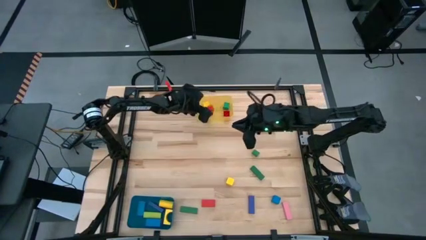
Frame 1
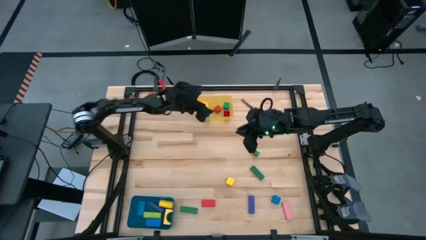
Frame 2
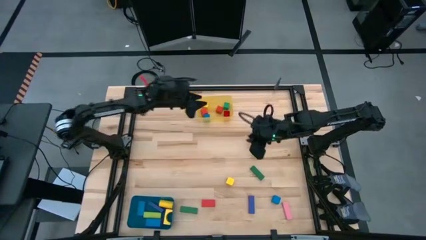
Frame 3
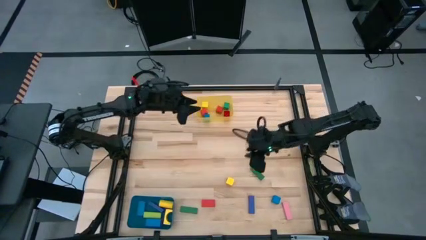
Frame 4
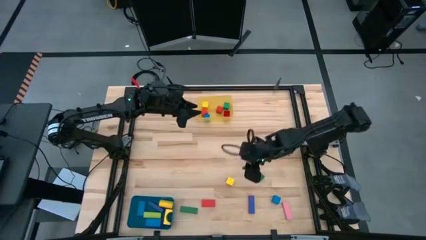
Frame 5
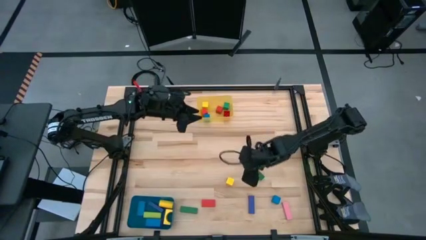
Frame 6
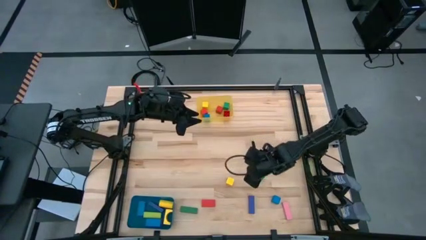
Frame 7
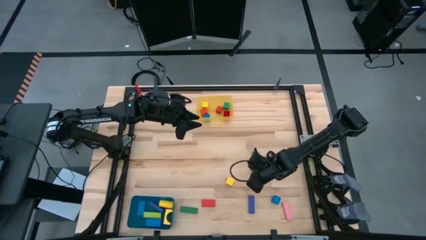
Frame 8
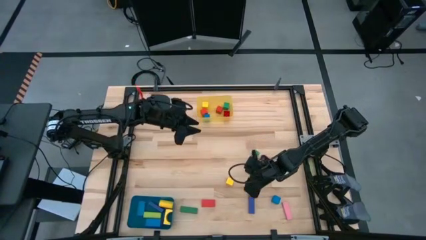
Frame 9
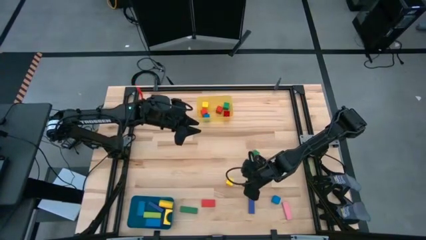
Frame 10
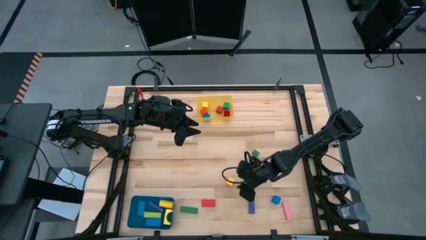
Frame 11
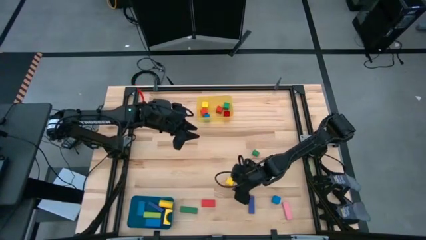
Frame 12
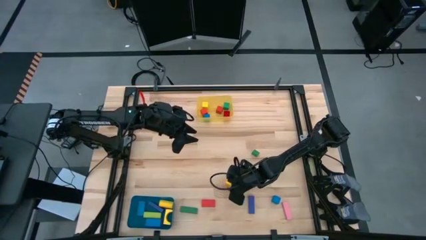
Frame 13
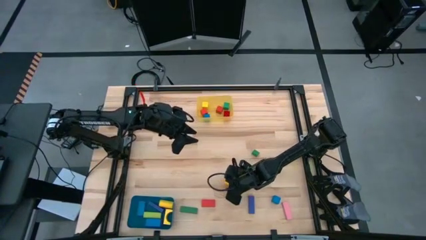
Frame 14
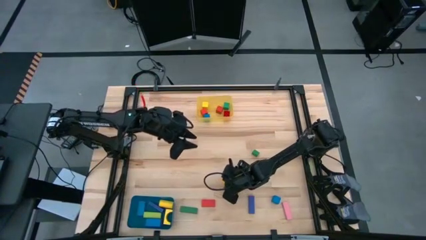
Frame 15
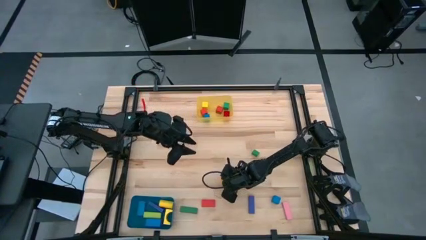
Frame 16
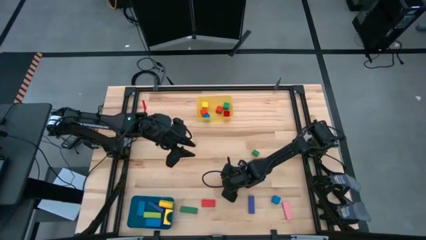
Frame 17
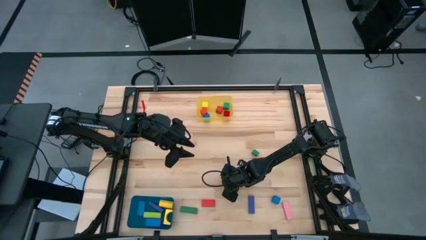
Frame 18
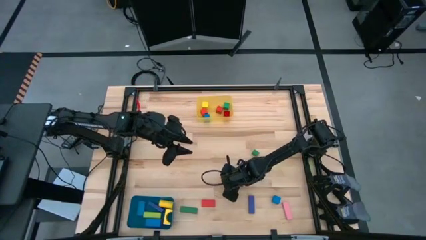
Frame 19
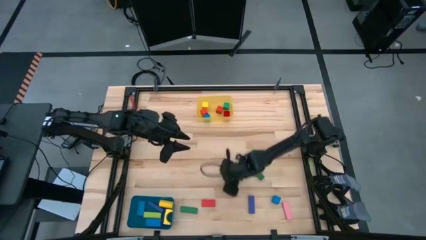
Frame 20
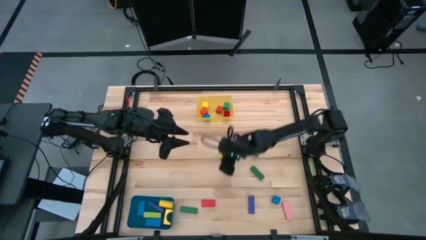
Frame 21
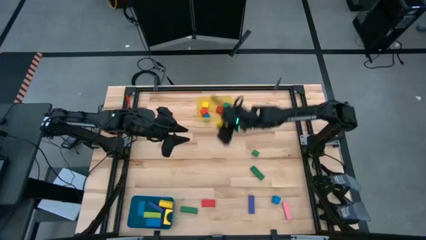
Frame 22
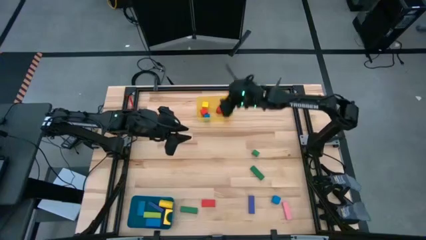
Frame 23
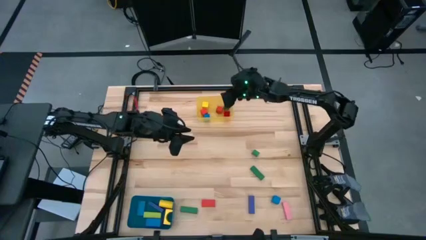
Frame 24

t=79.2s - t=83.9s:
Task: Sort blocks by size
Put the yellow square block into the yellow bin

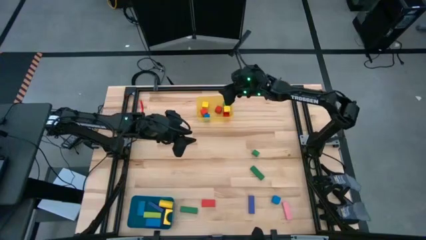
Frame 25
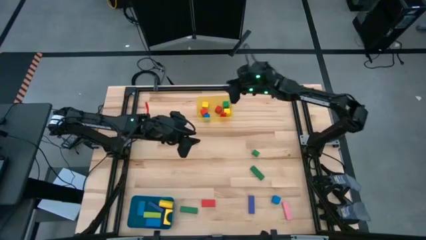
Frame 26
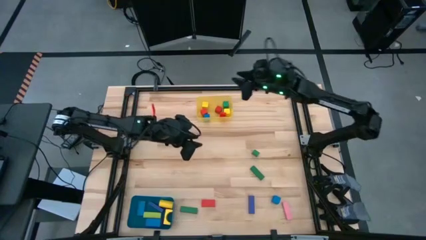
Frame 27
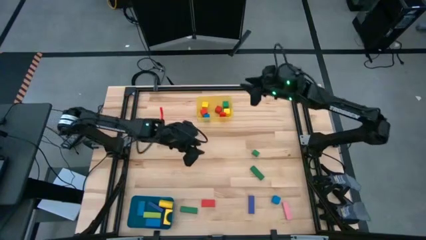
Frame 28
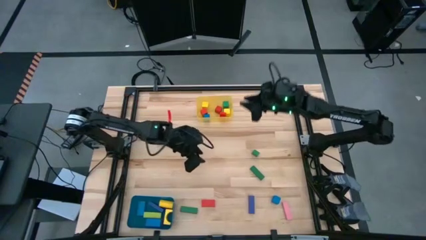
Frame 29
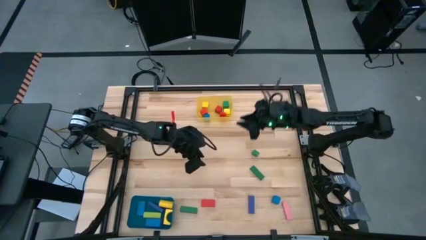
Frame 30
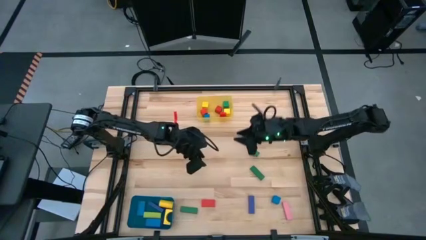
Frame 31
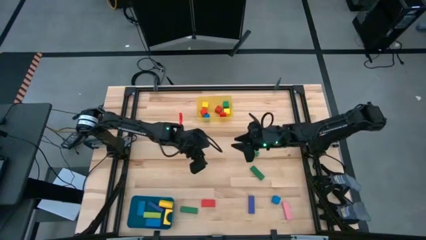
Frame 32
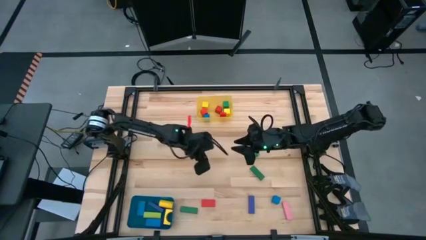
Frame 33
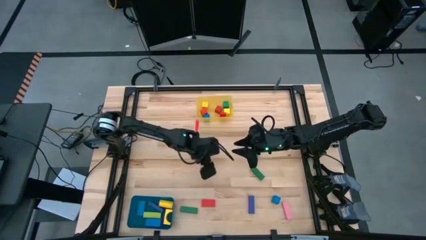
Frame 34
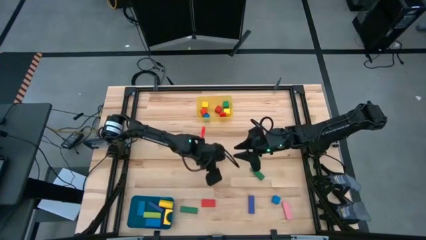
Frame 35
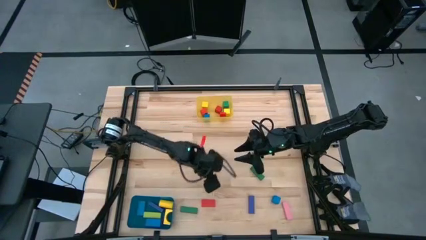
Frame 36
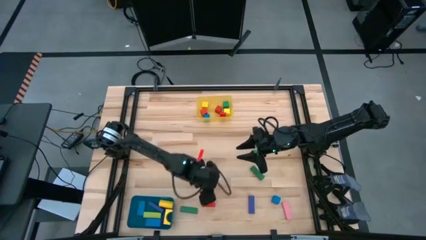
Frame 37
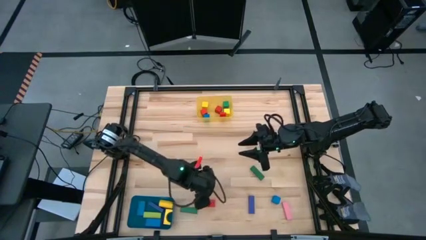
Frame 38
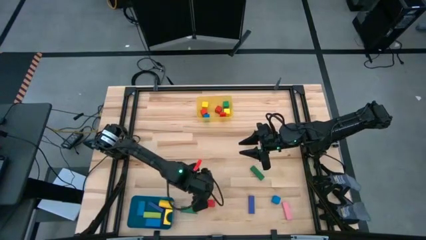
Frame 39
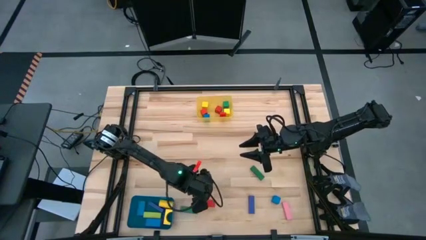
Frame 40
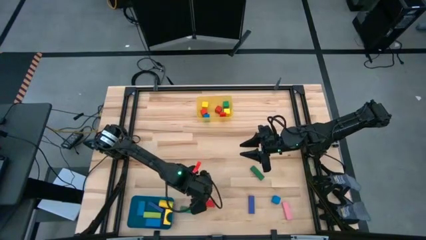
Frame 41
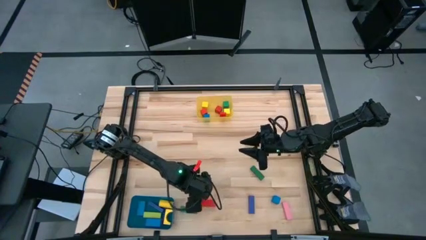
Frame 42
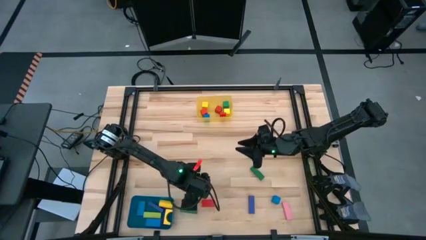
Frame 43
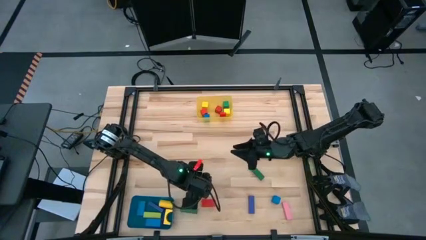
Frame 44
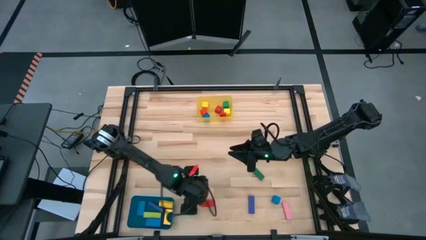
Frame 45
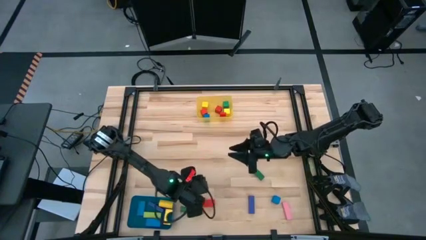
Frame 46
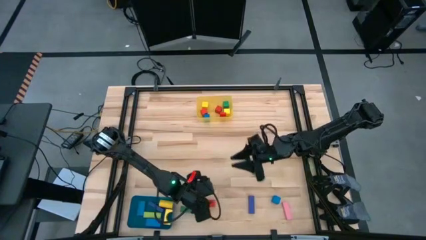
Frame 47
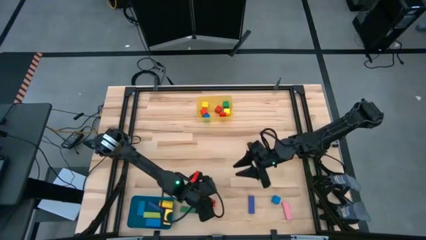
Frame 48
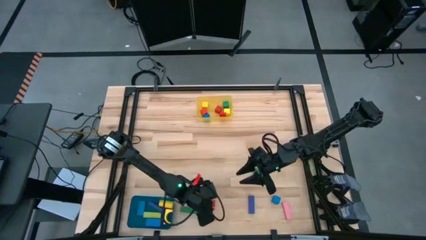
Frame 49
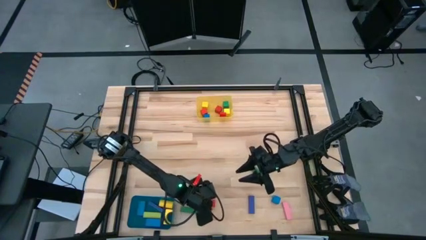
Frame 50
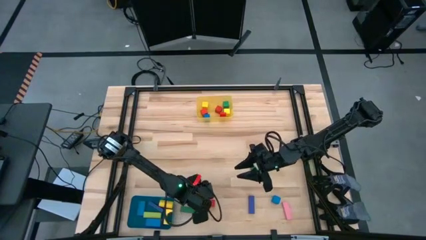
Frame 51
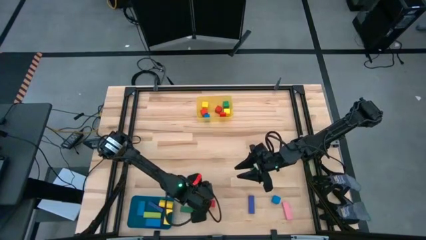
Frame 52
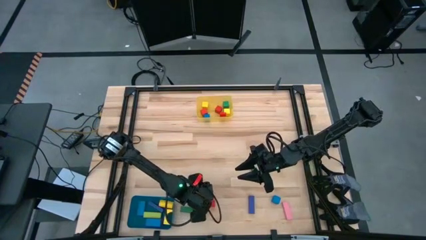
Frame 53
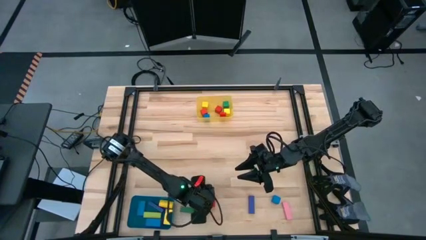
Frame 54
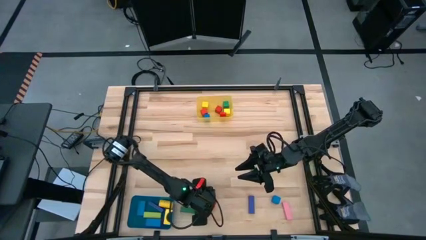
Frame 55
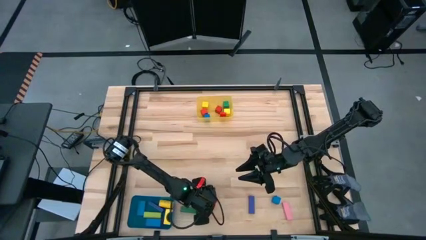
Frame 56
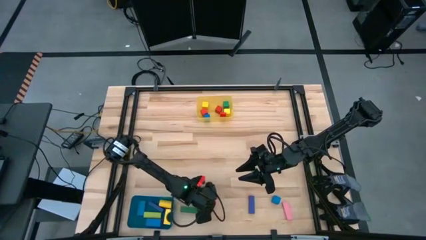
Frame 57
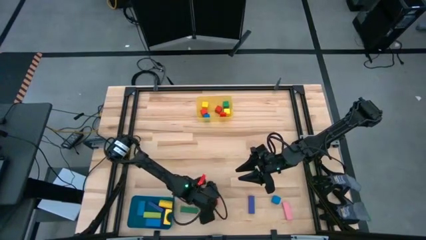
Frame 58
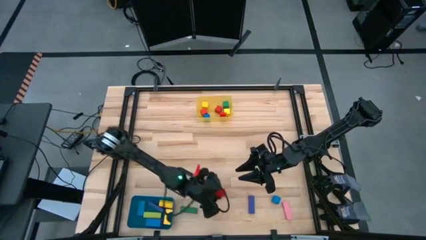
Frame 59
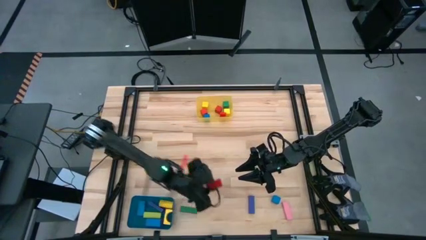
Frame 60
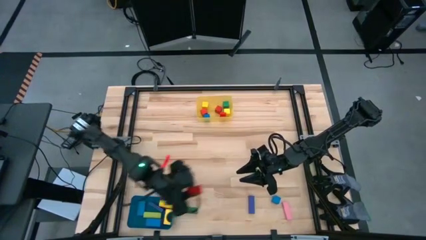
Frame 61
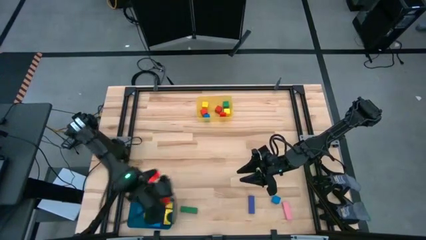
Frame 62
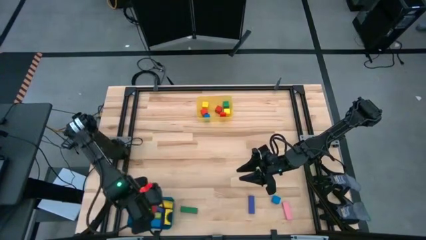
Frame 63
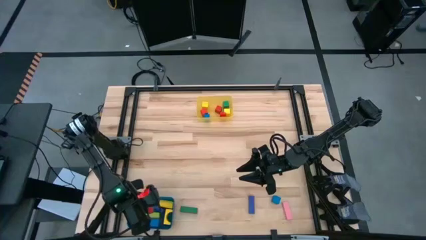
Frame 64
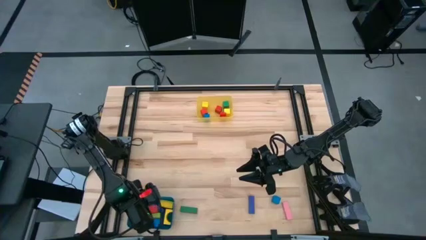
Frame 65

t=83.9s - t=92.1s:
Put the red rectangular block into the blue bin

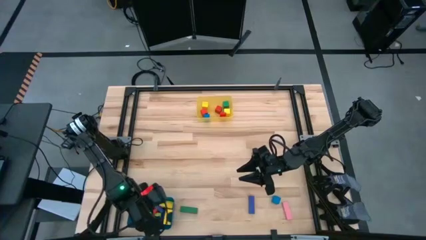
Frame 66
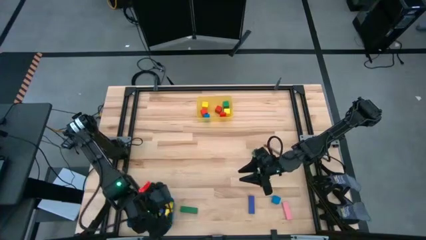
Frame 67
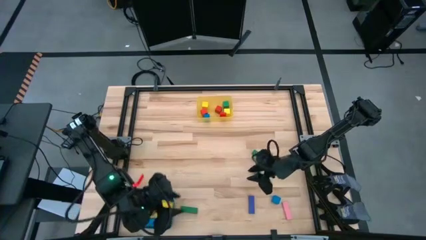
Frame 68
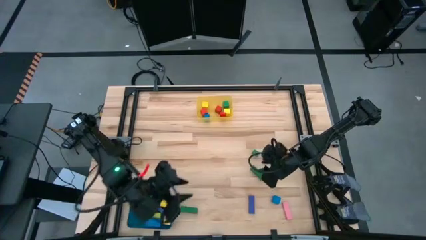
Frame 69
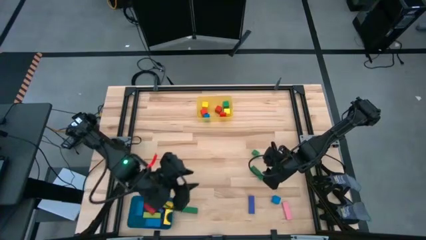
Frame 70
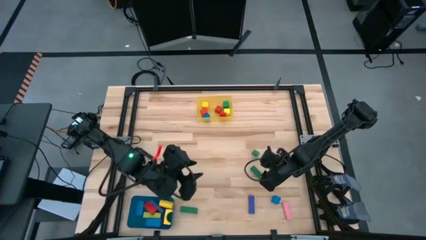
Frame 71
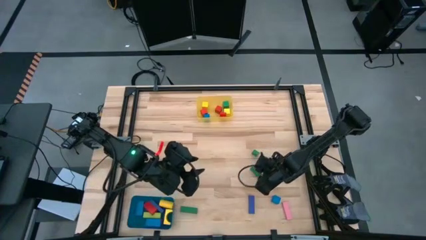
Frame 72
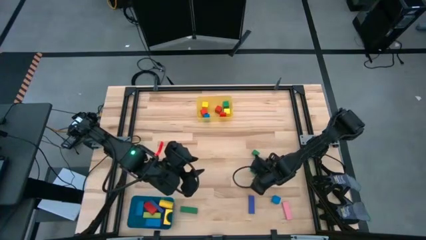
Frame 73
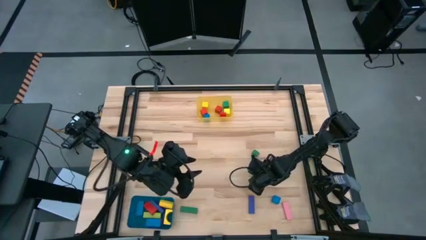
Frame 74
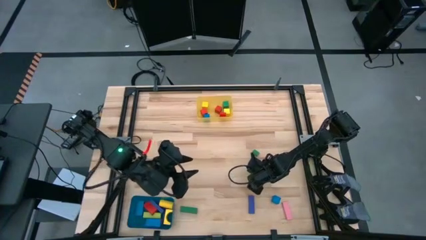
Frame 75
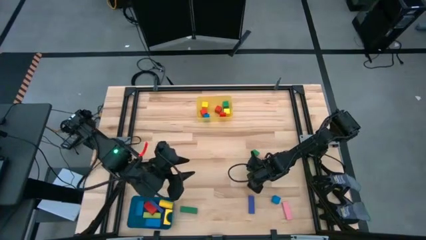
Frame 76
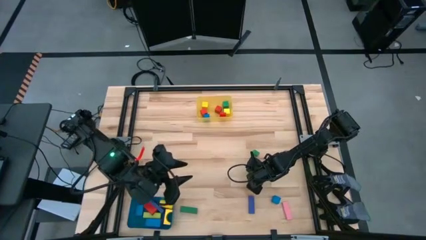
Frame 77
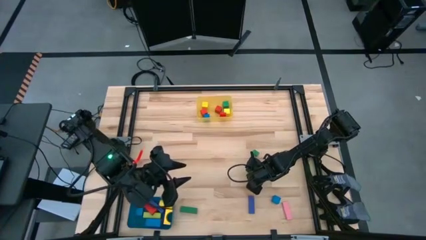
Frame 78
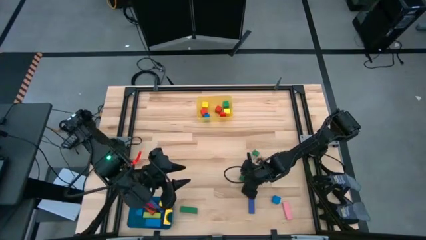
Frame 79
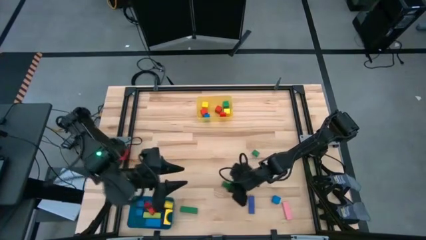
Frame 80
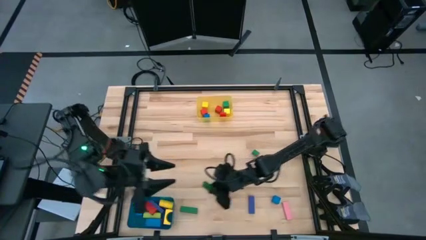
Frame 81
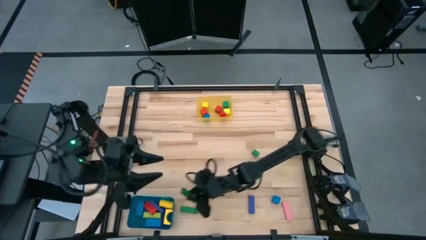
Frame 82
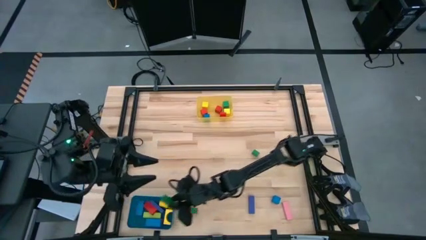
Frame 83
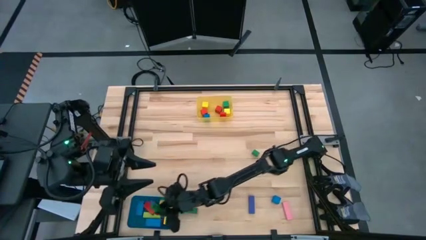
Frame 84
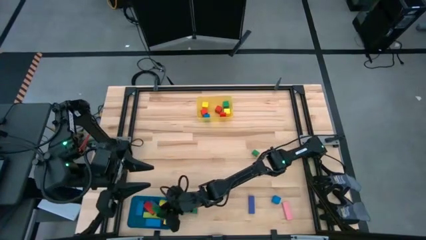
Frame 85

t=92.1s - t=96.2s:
Put the green rectangular block into the blue bin
